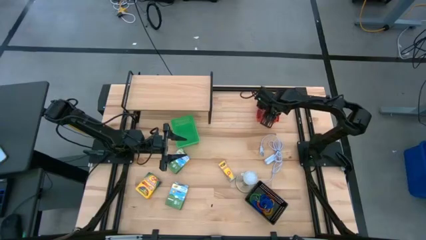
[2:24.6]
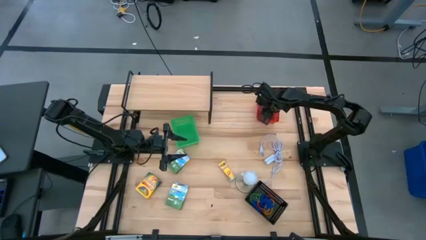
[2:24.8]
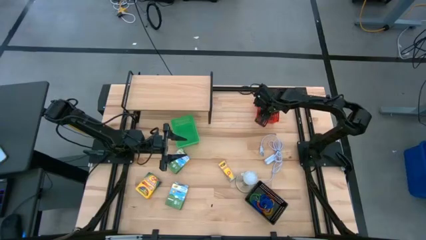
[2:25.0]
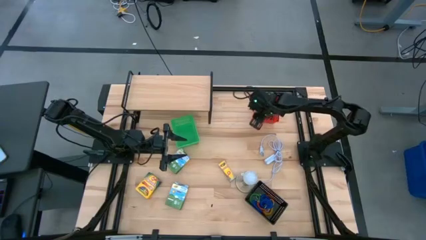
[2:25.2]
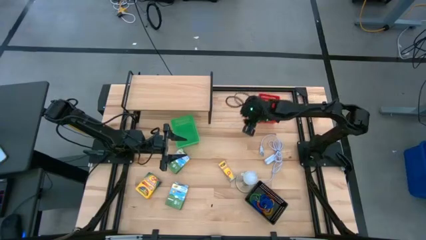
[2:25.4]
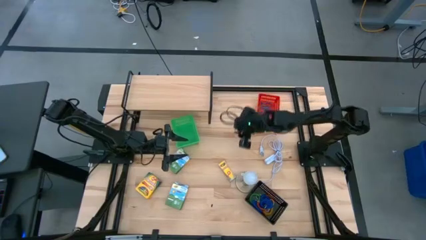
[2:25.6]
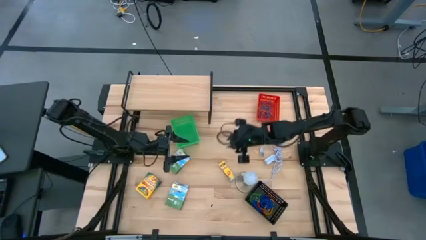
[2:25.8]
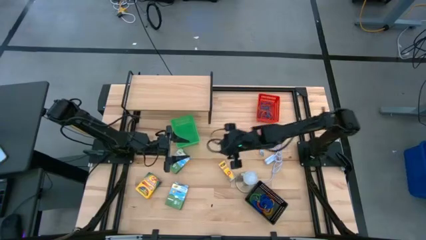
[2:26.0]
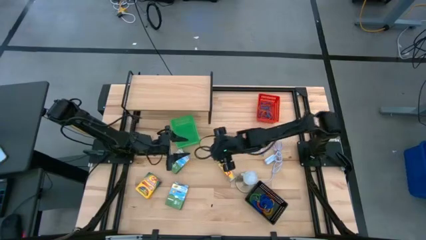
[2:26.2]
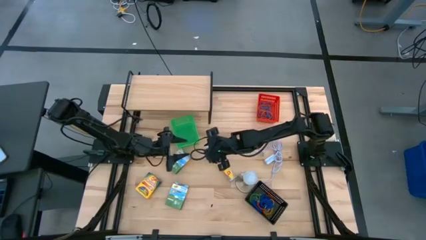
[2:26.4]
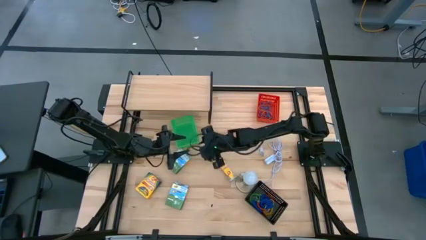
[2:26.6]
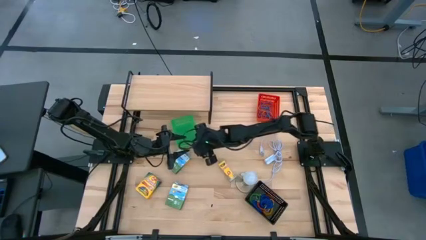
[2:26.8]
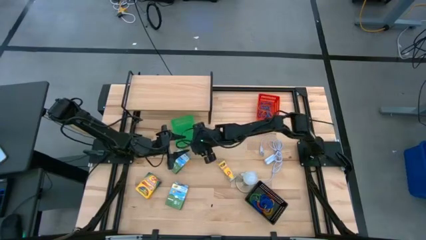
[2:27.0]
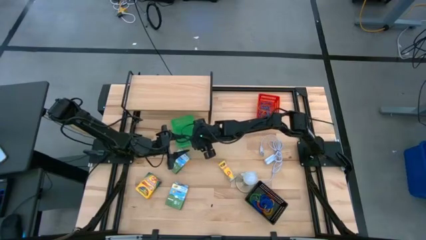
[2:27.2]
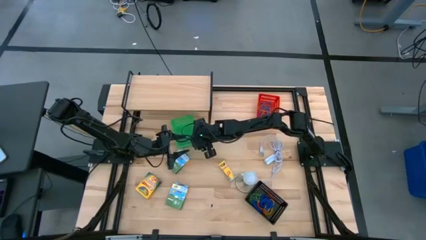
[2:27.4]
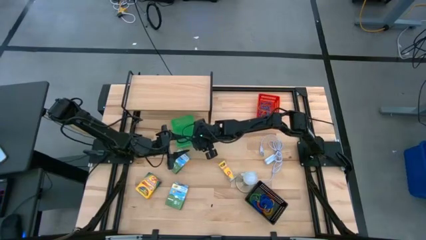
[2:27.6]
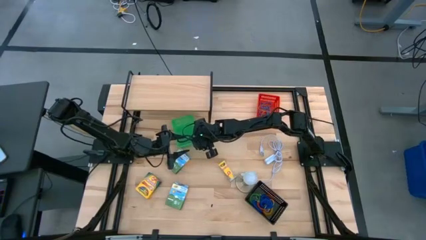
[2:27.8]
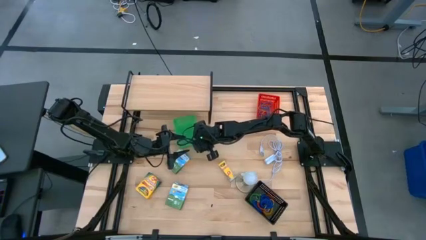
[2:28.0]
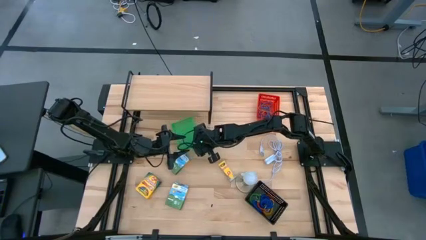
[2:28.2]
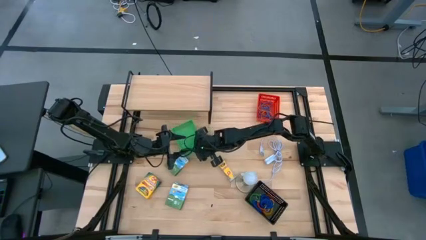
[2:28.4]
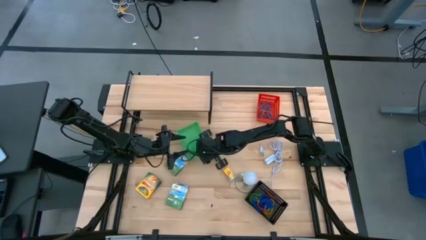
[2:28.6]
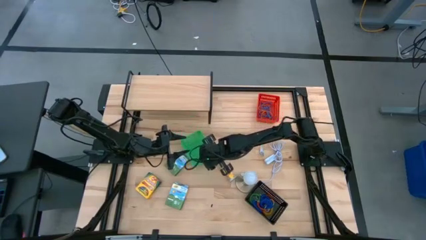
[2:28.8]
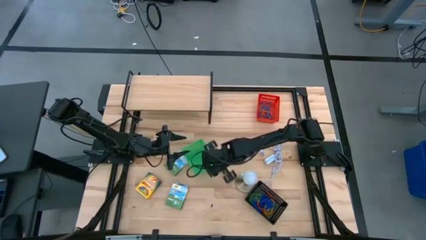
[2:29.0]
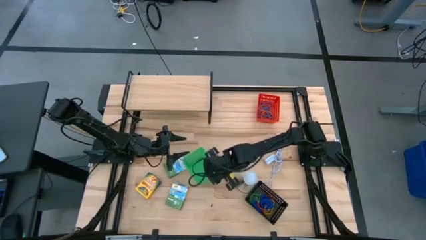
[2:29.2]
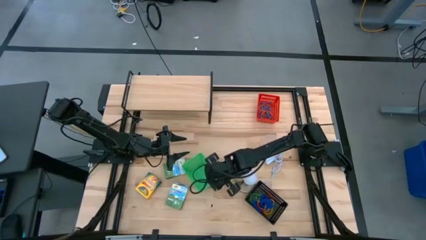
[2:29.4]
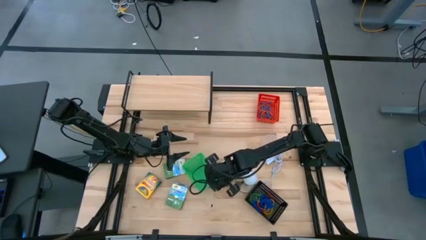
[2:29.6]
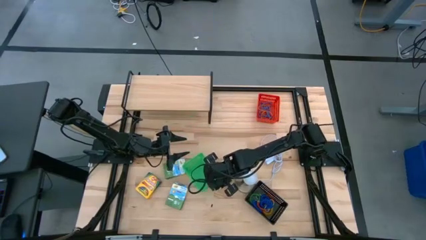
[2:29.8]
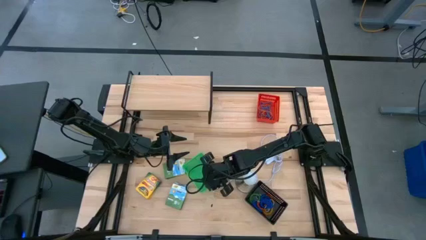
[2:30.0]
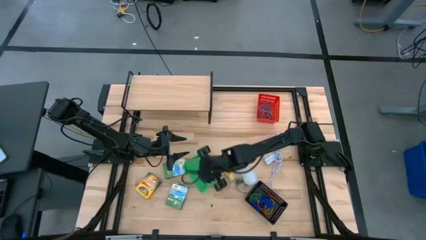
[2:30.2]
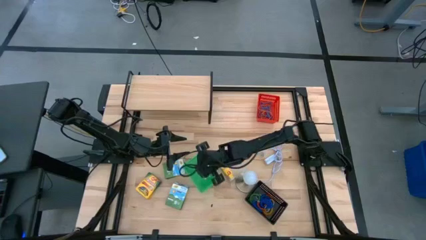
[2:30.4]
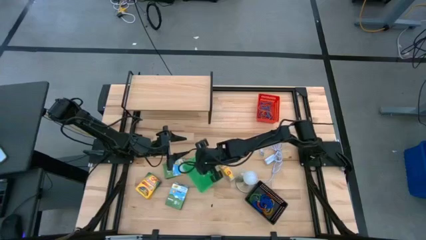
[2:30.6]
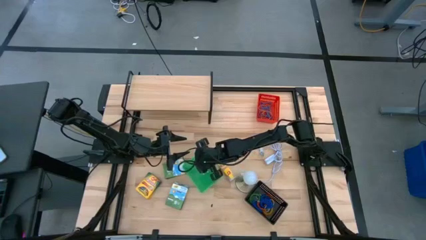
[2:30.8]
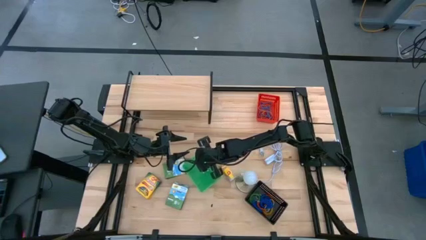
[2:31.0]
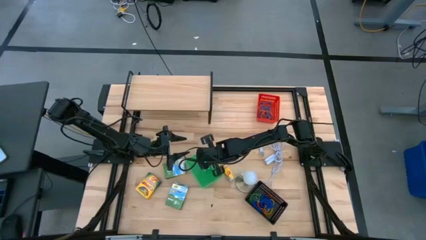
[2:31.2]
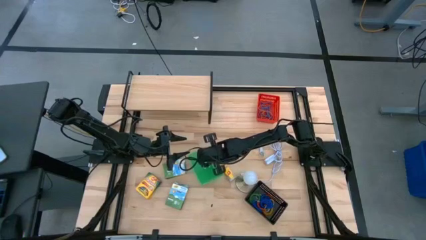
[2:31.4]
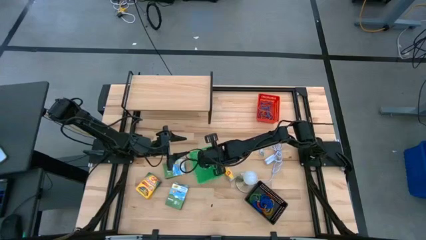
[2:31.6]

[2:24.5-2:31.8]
Task: Pick & Place Office Desk Supplies
Move the green basket to the middle of the table

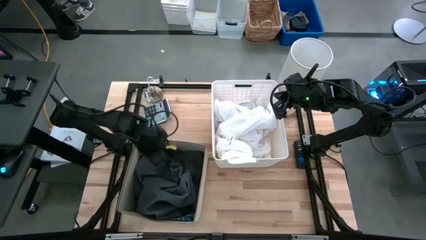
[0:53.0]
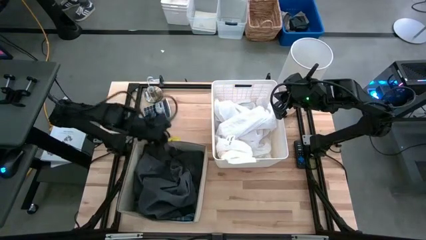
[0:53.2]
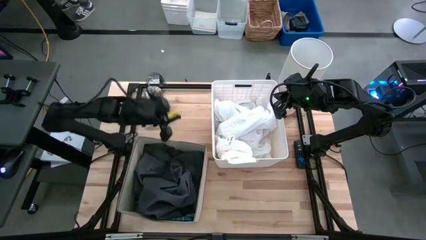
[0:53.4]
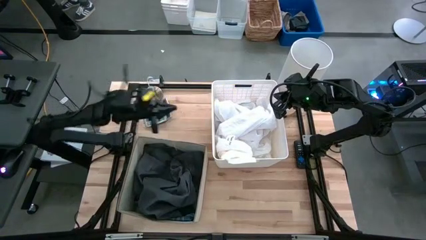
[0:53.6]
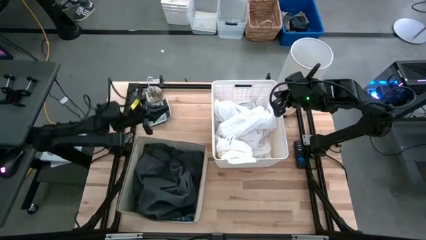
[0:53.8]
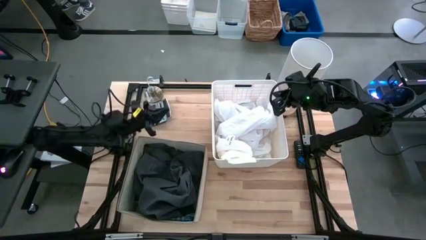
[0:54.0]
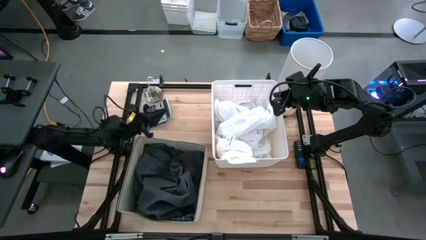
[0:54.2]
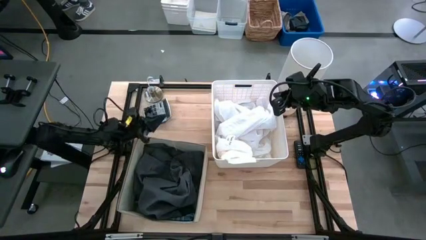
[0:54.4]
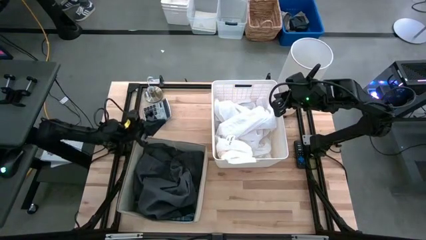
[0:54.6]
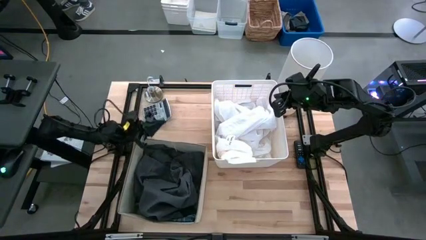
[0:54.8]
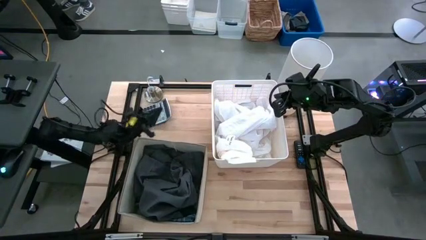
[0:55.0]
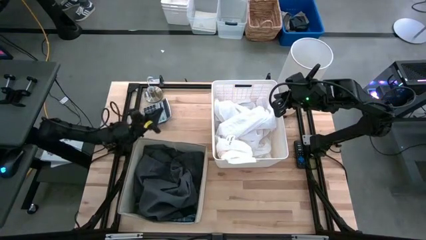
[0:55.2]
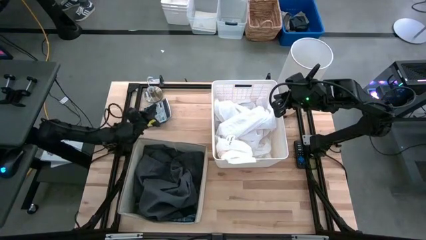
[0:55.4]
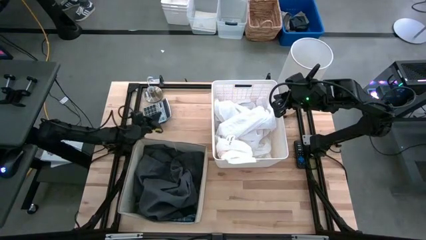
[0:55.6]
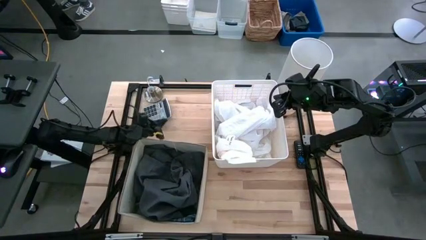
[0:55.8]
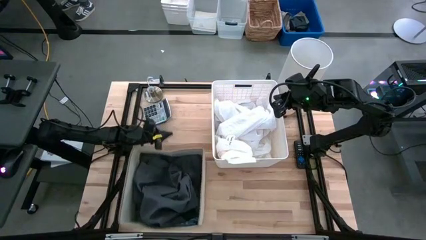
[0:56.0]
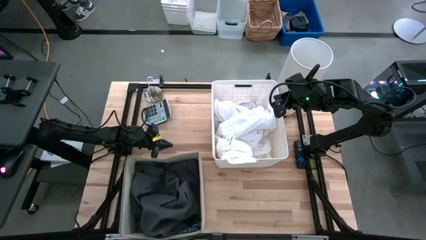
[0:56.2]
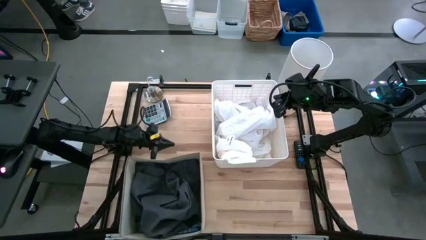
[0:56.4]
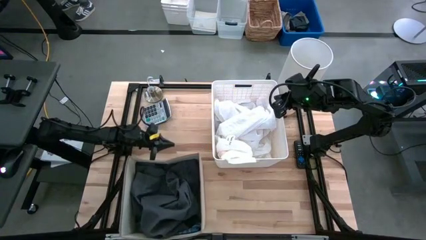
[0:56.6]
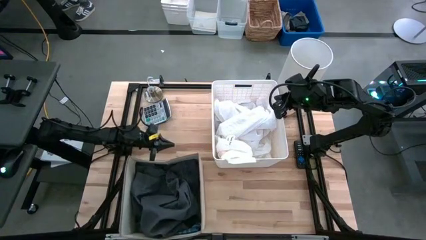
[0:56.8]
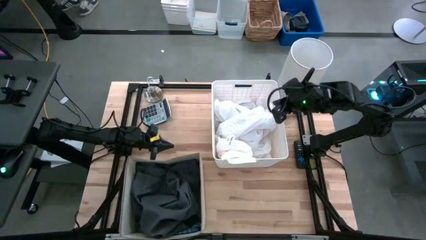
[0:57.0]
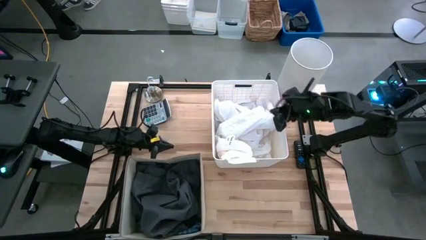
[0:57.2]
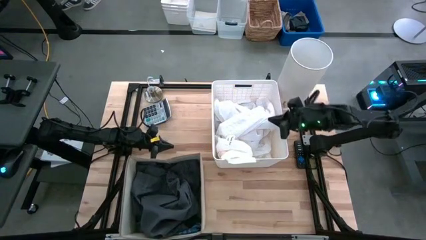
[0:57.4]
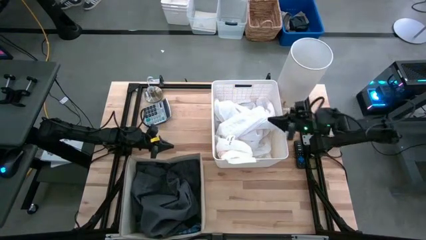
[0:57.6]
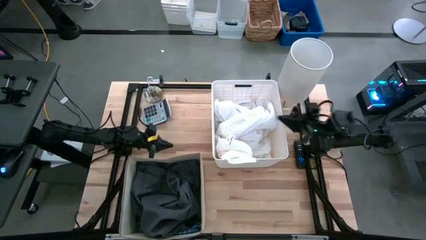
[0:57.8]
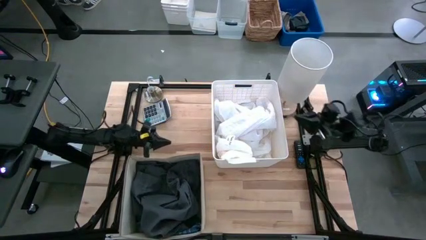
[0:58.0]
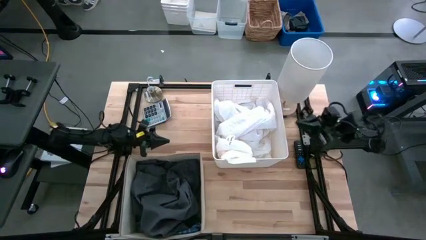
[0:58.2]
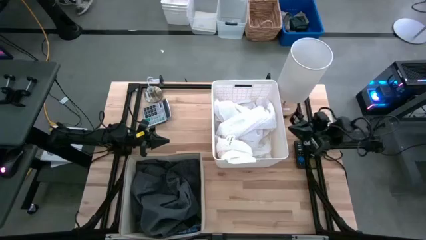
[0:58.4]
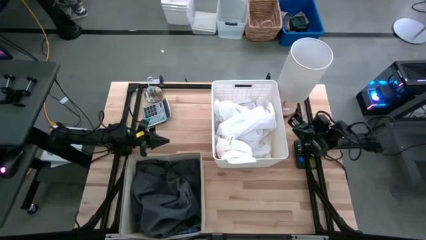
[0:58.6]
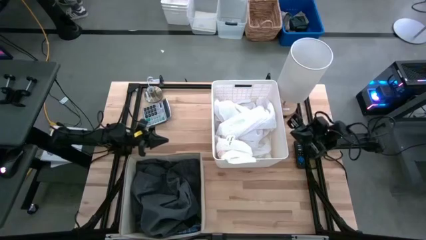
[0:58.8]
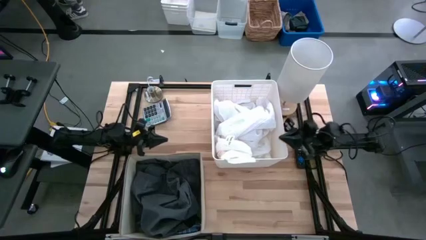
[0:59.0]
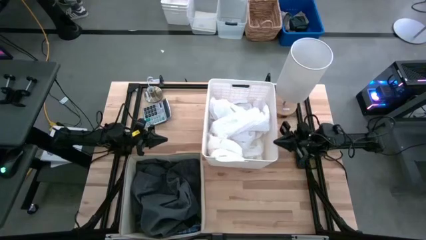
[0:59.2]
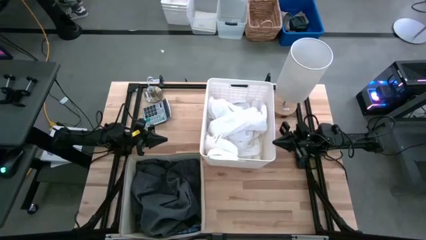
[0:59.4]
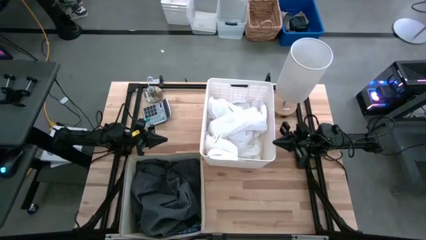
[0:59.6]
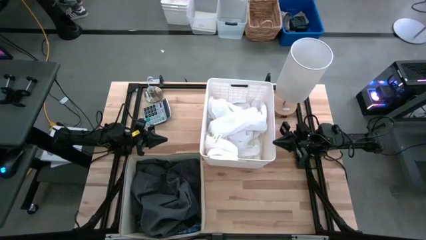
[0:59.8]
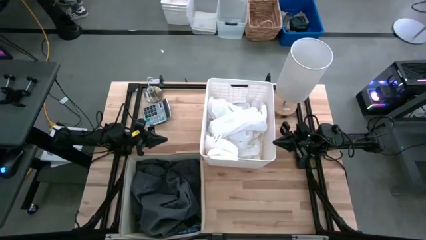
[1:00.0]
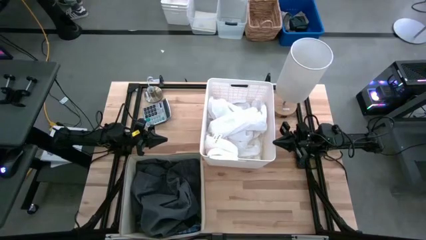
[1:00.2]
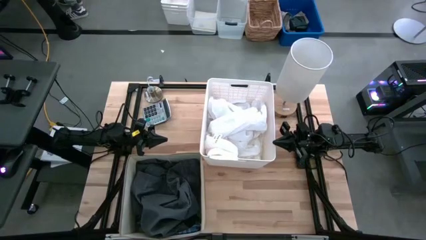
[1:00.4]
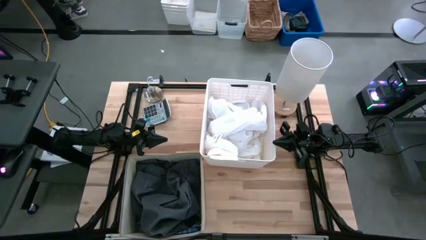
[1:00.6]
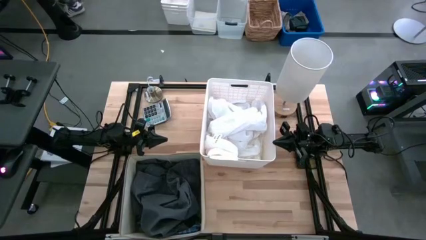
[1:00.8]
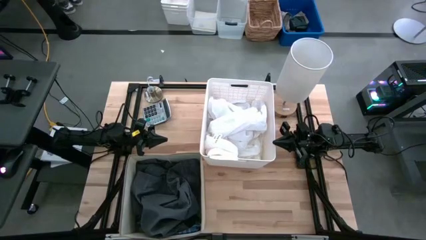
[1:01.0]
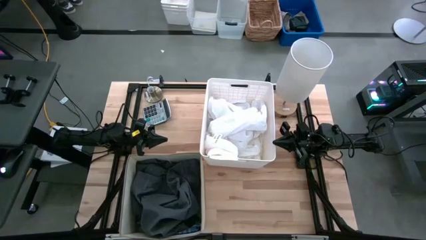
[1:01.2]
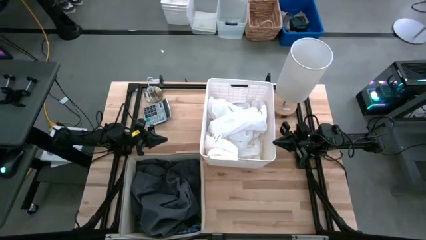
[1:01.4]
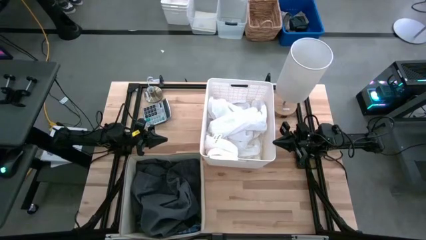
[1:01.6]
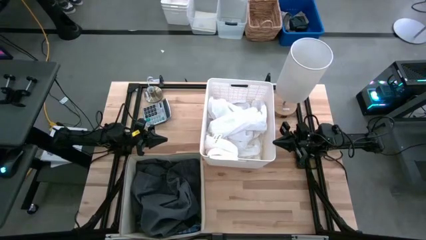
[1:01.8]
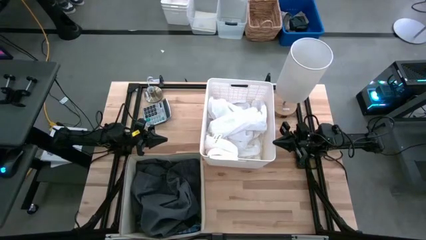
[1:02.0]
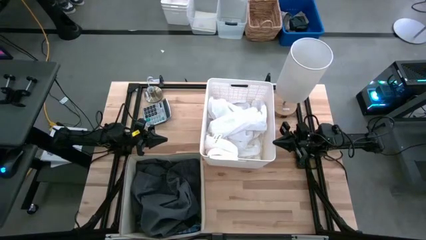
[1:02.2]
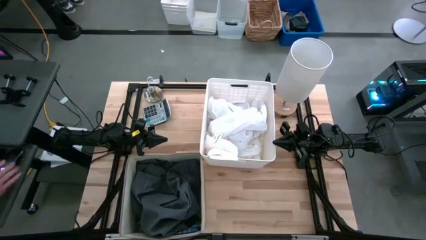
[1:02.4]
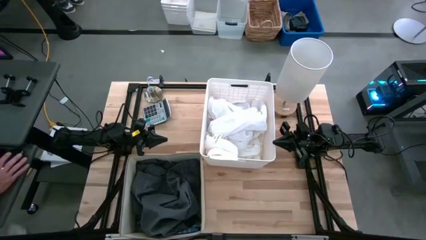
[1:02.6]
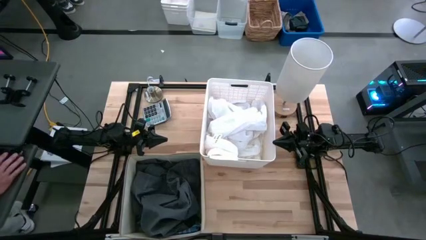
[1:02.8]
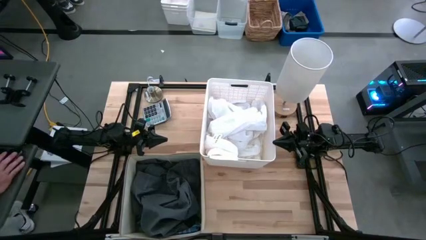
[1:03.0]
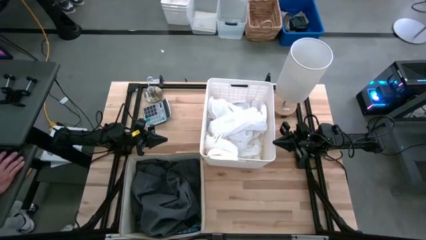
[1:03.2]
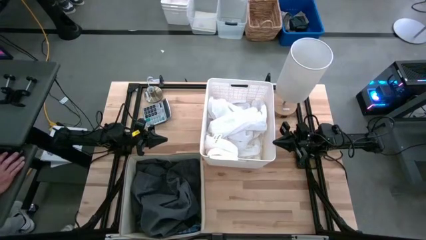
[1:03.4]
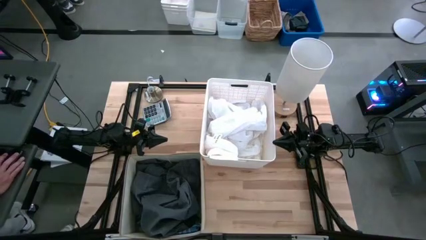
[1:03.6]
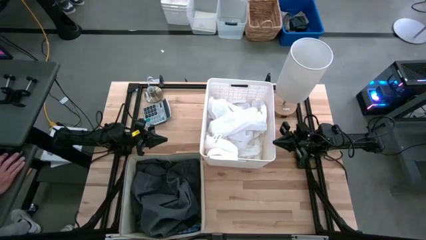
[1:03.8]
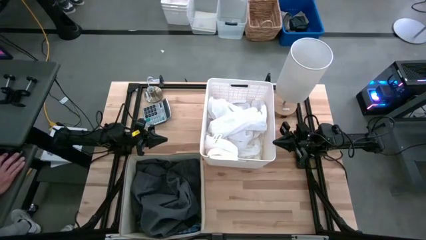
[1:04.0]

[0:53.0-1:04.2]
Task: Sort clothes
Return to Home Position
